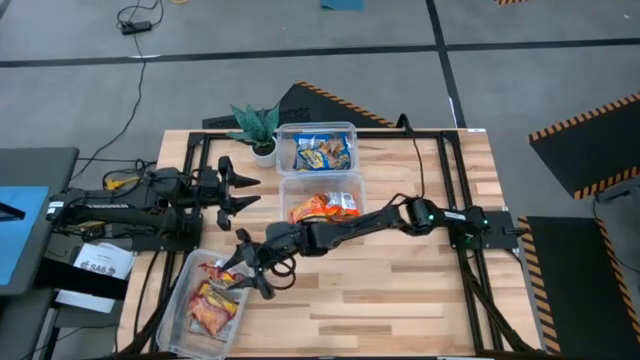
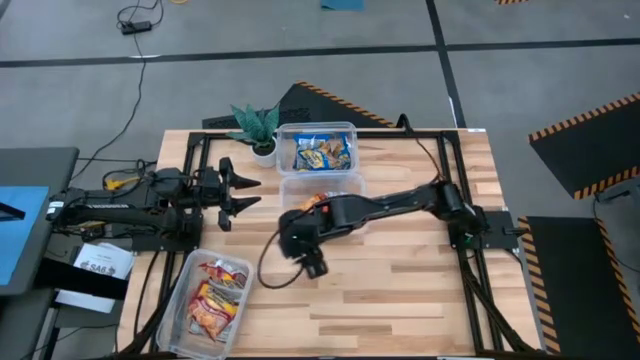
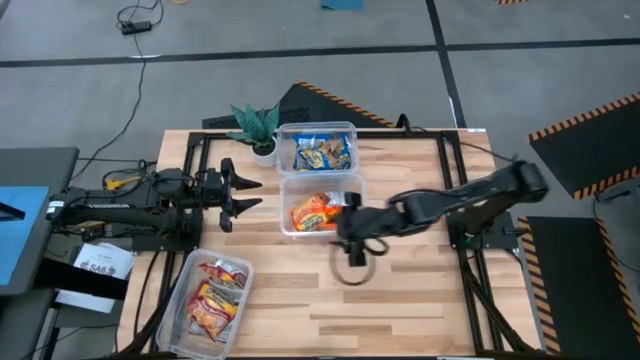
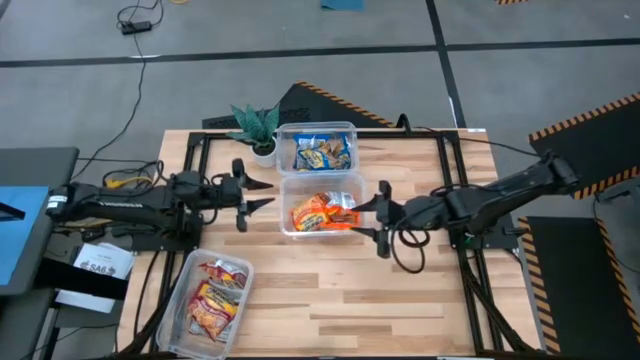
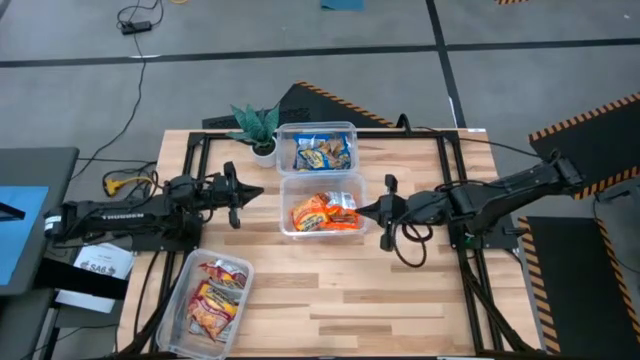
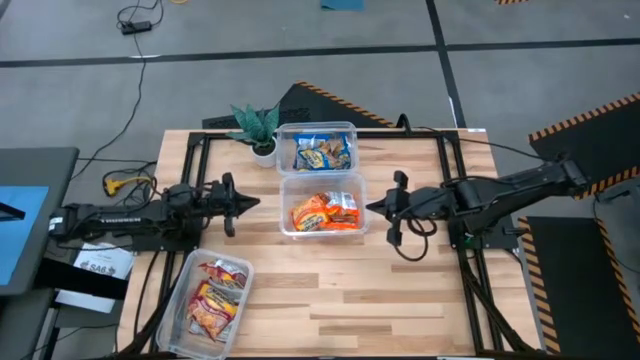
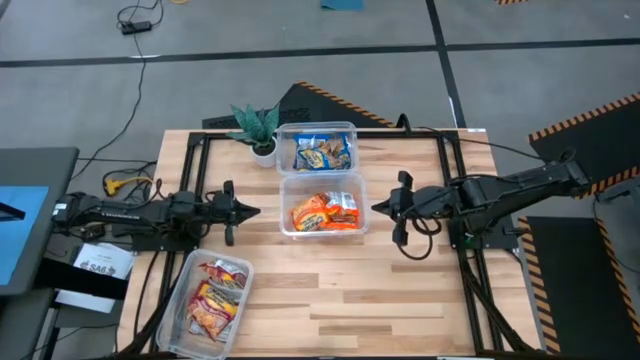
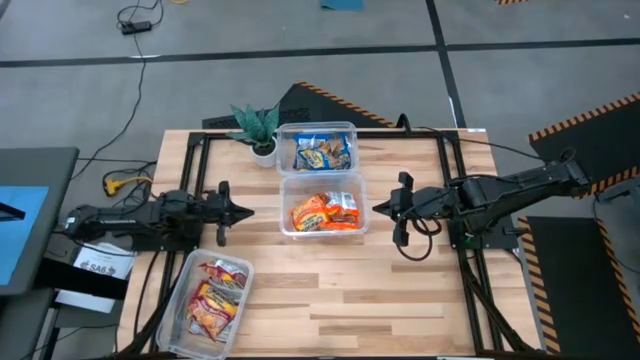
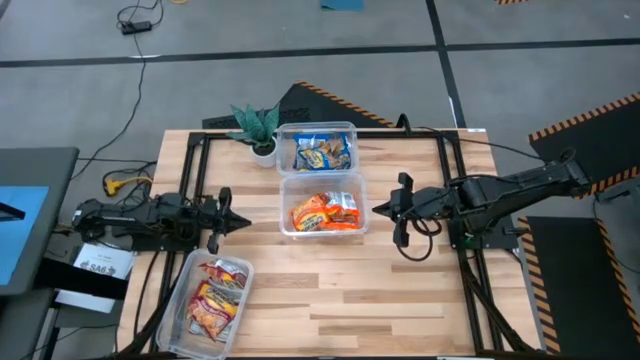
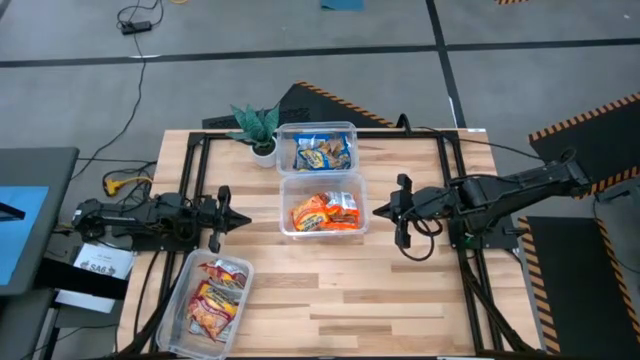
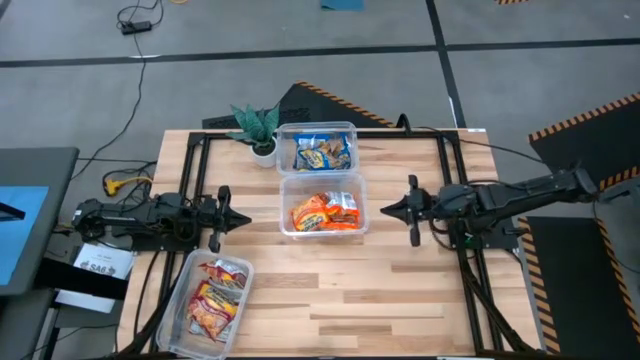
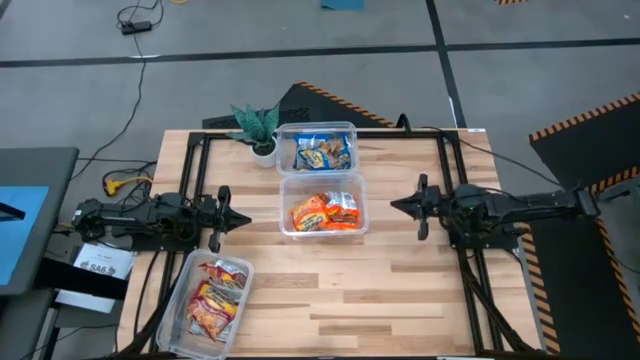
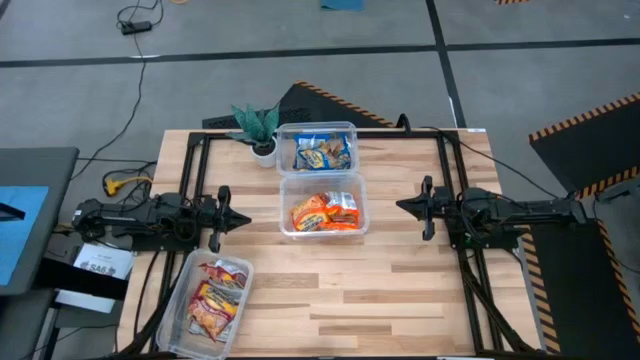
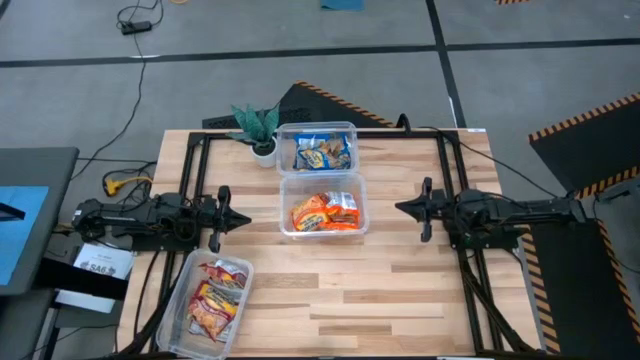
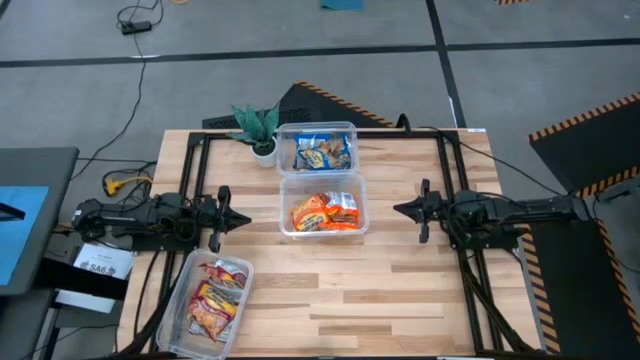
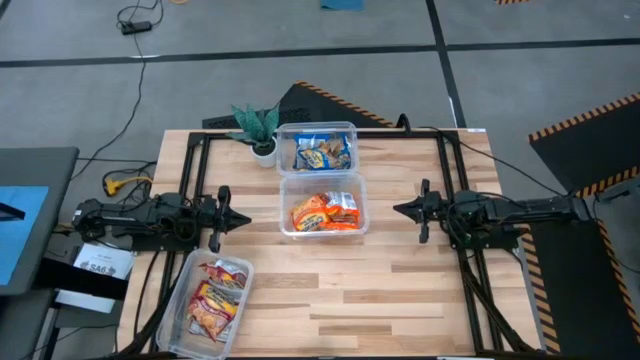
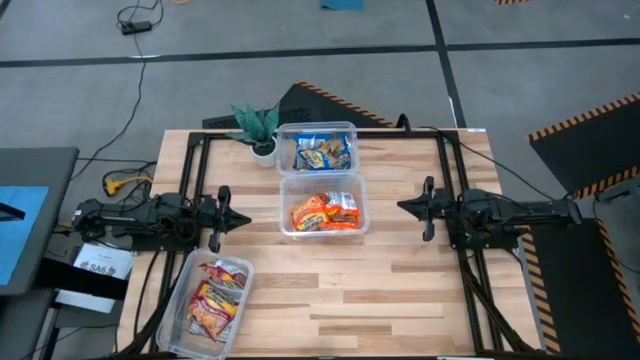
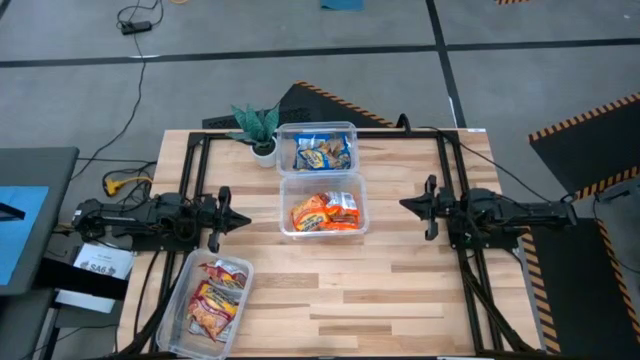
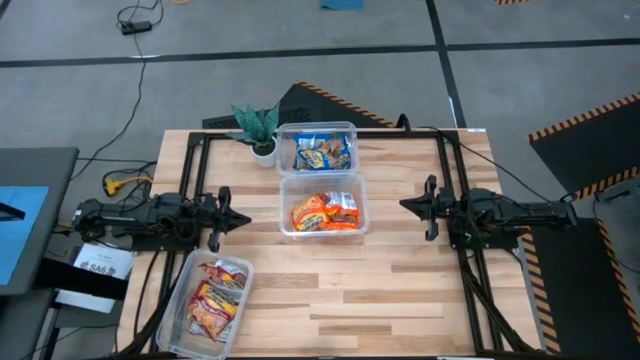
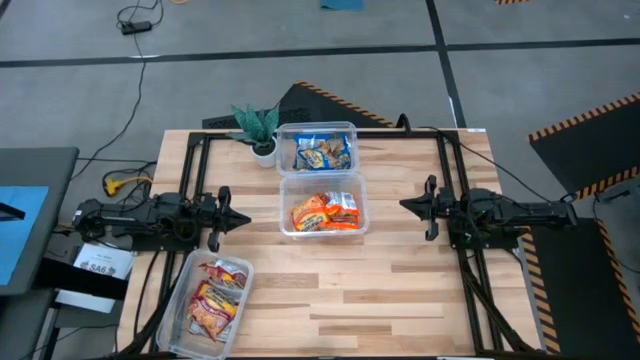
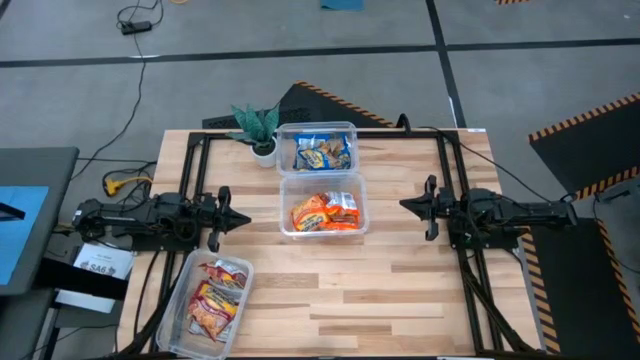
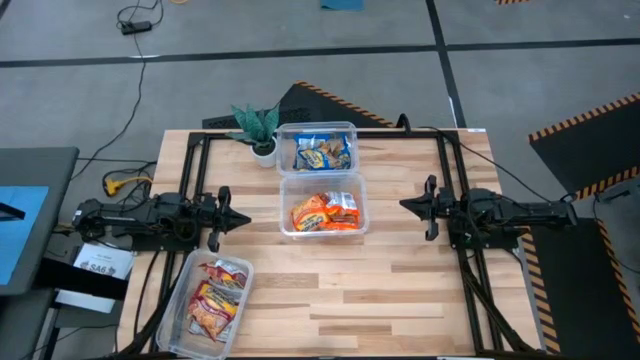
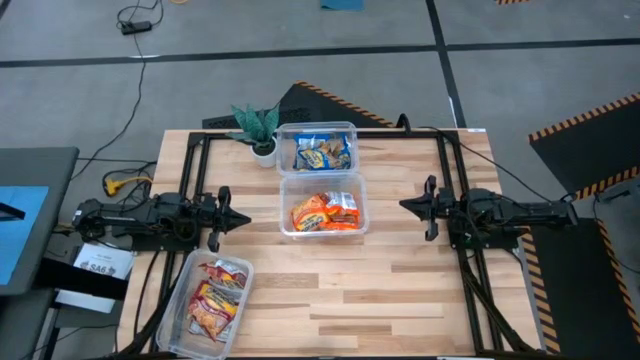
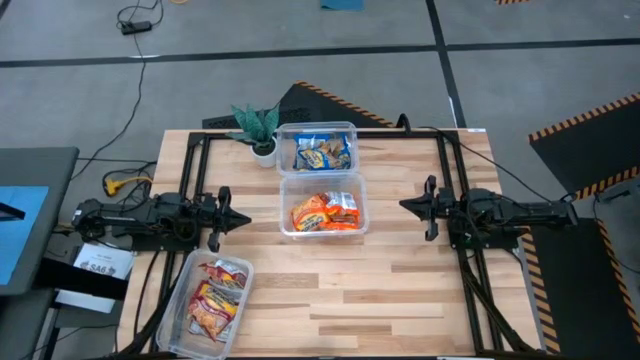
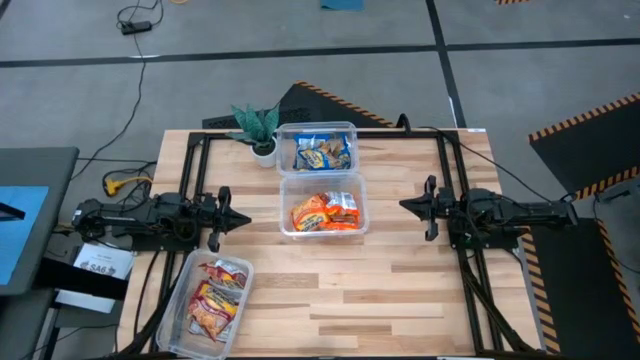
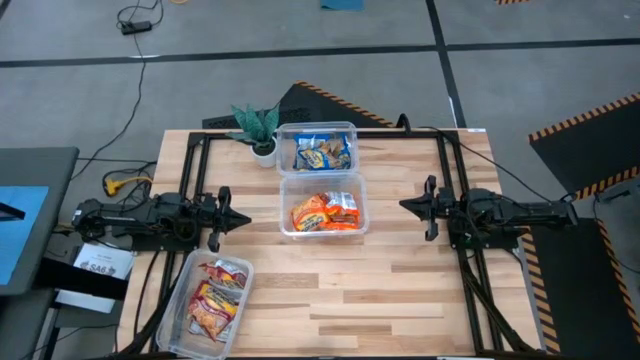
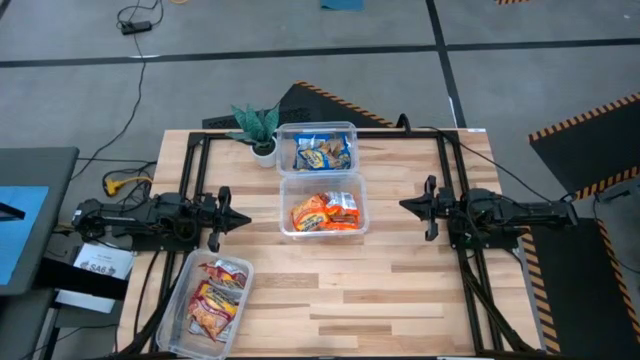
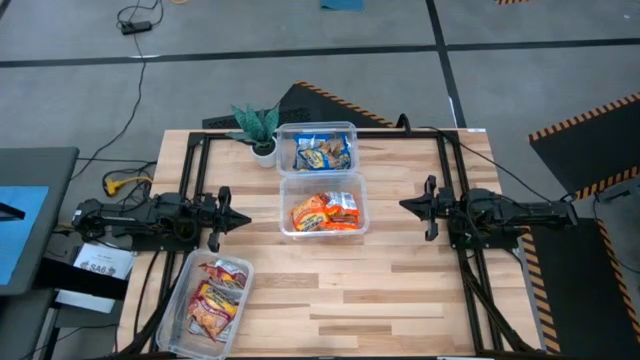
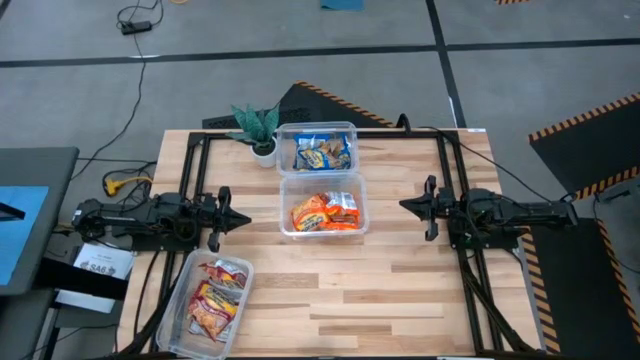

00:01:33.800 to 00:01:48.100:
Task: Sort Maruchan noodles
Return to Home Position

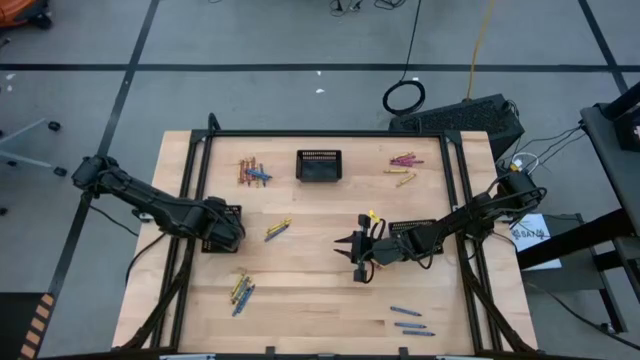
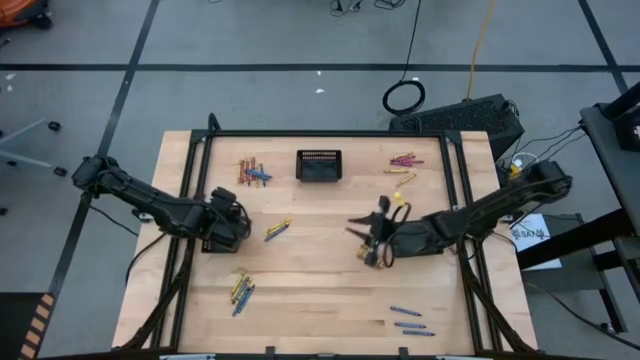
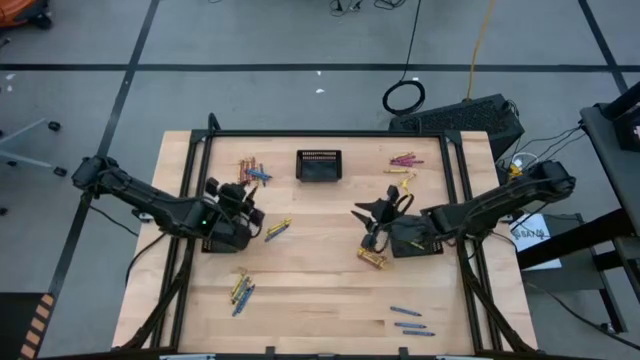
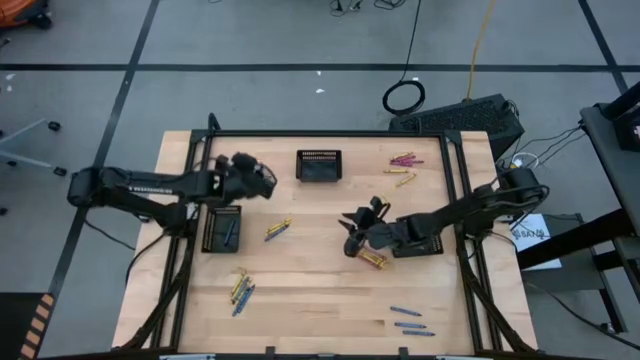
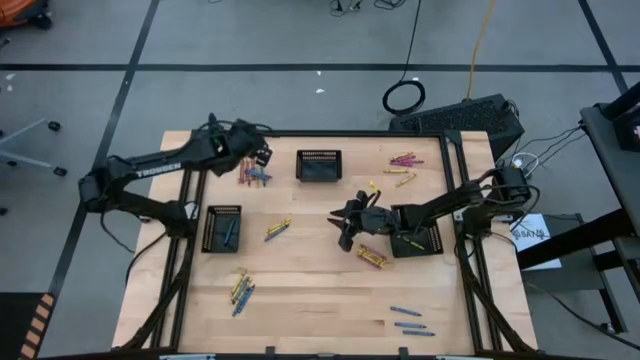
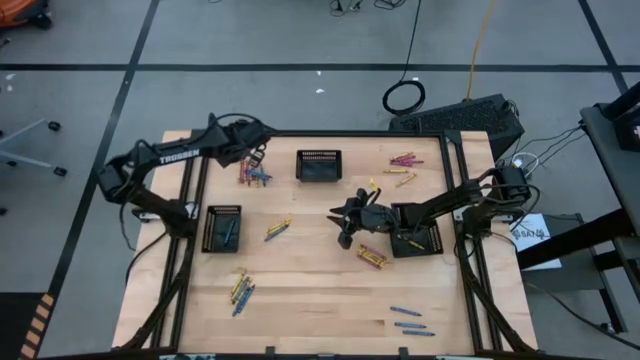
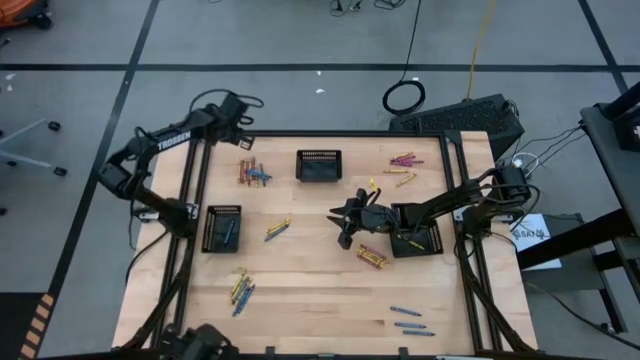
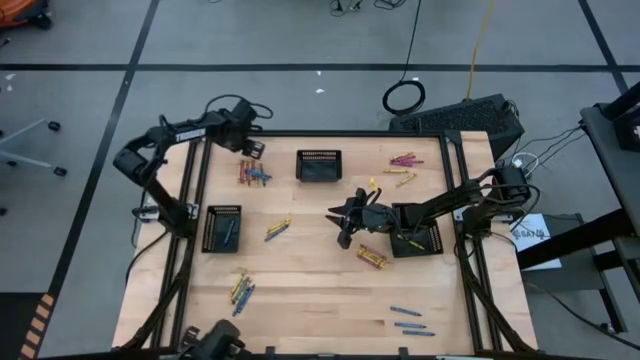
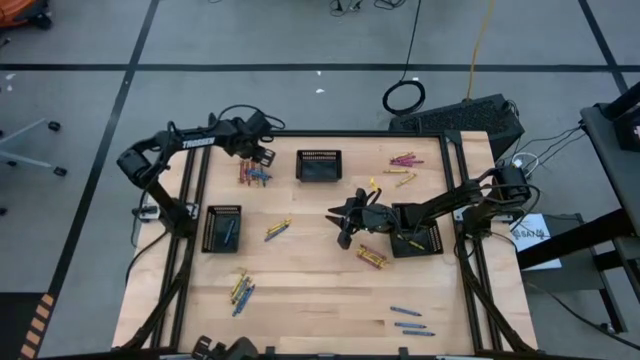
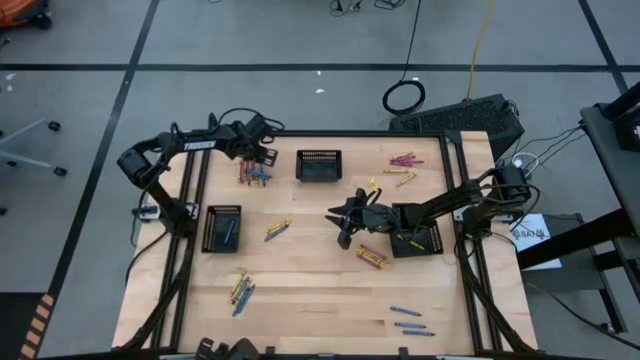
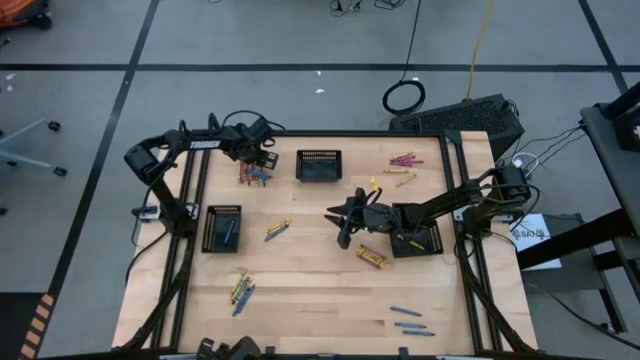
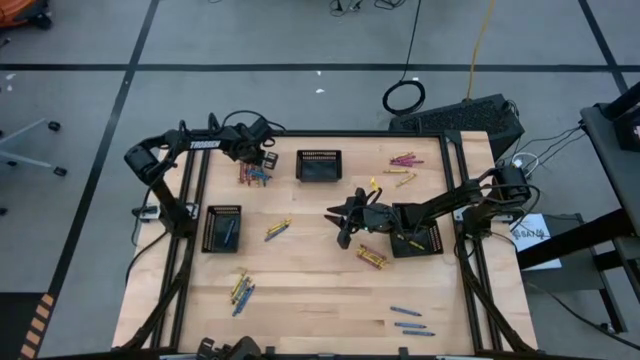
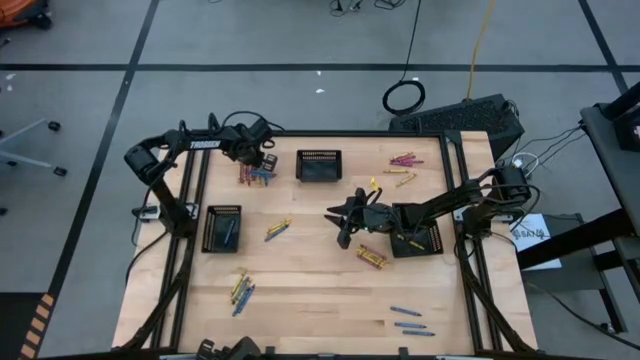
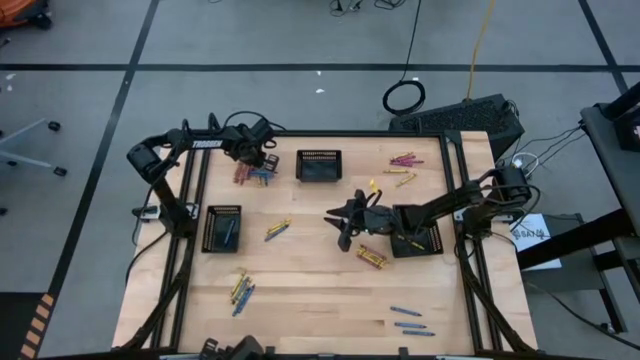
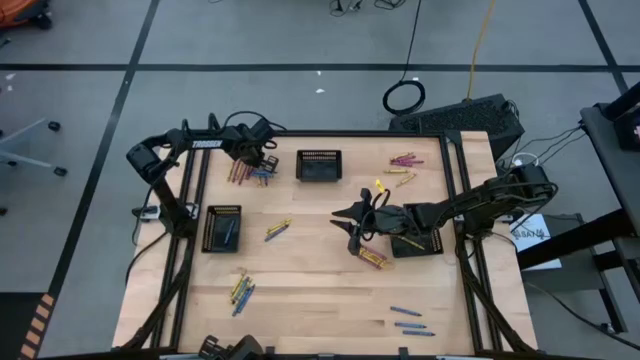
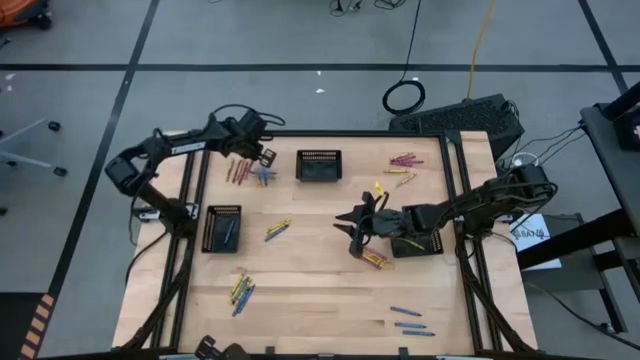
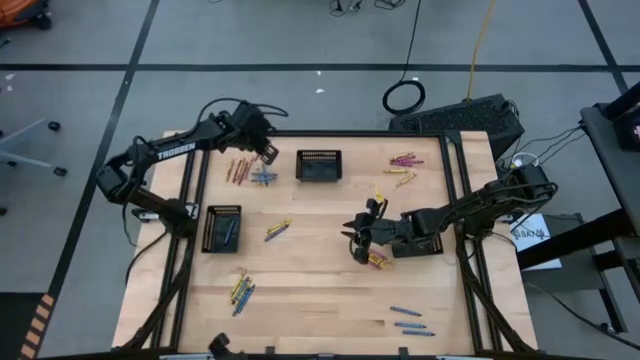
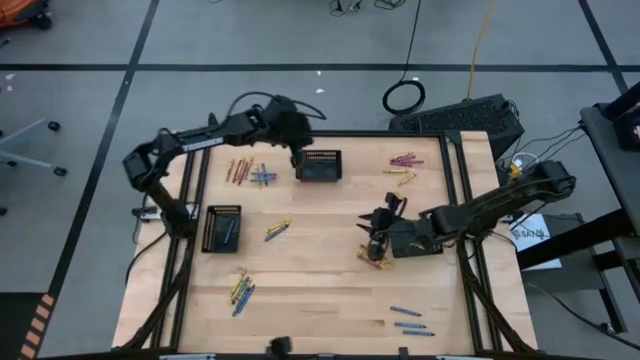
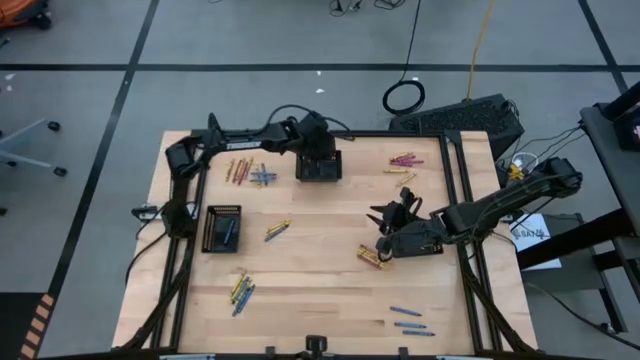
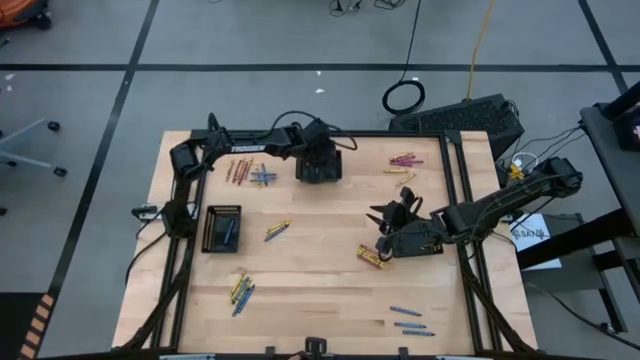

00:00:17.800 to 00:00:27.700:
Task: Sort crayons
Put the red crayon into the top black bin
